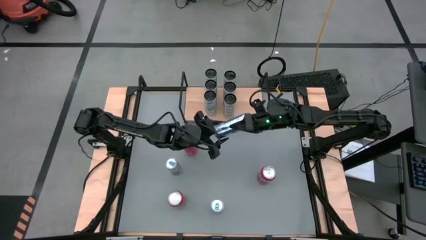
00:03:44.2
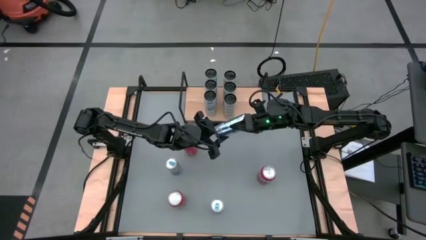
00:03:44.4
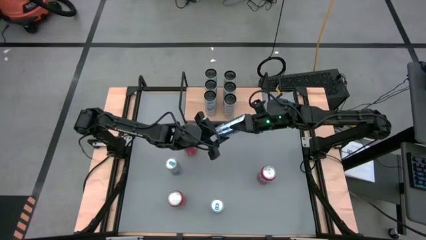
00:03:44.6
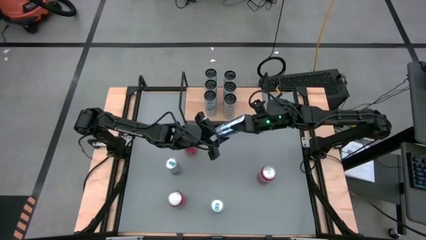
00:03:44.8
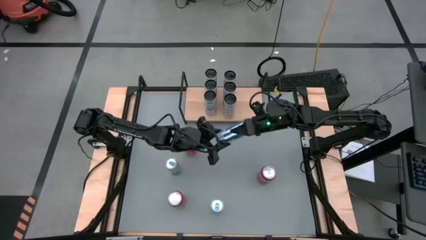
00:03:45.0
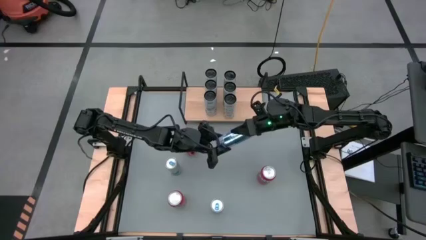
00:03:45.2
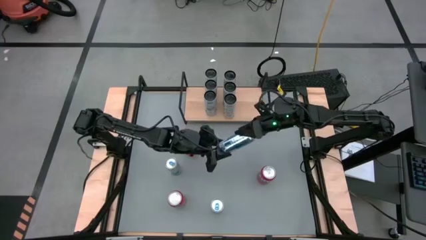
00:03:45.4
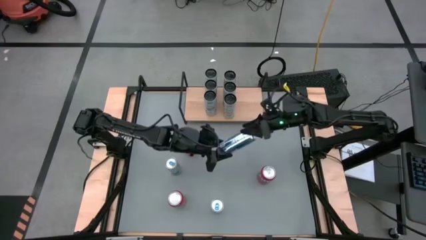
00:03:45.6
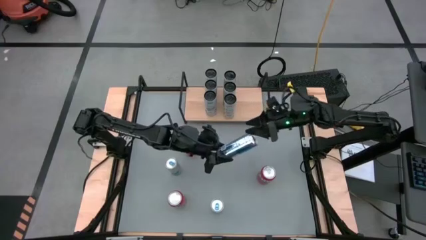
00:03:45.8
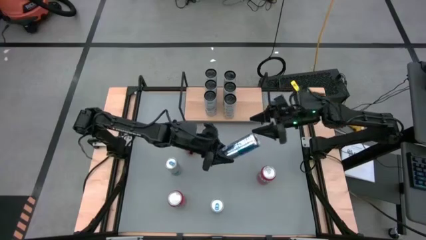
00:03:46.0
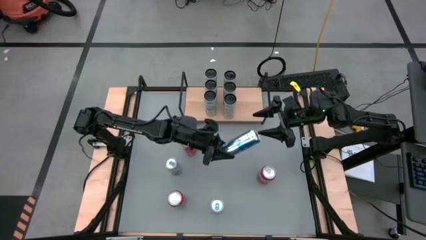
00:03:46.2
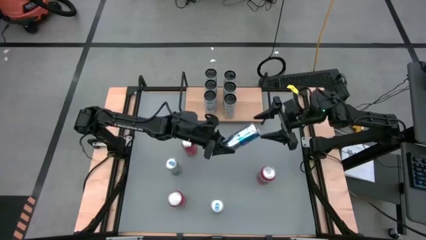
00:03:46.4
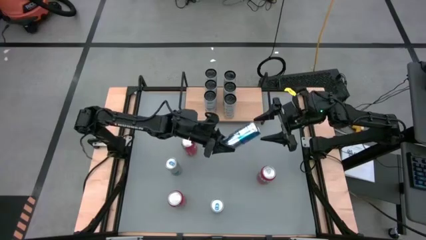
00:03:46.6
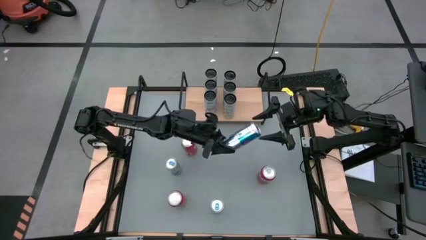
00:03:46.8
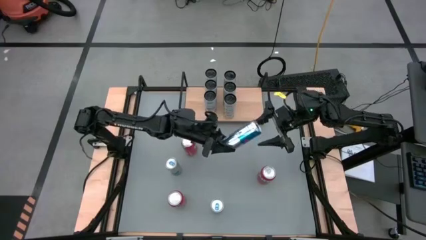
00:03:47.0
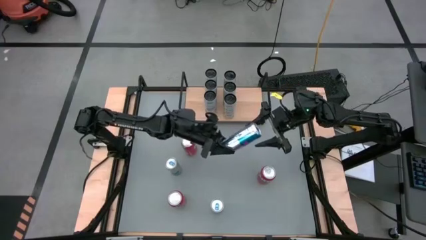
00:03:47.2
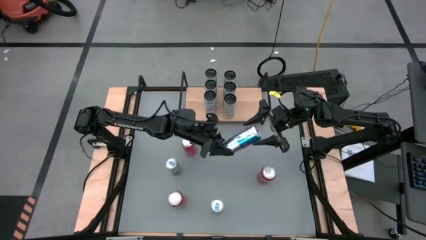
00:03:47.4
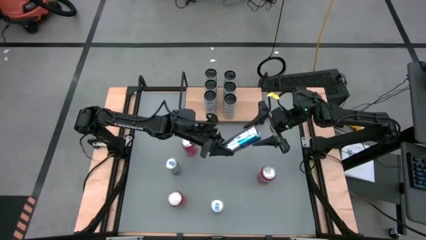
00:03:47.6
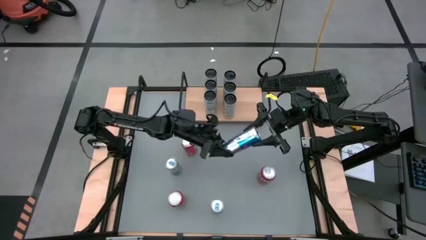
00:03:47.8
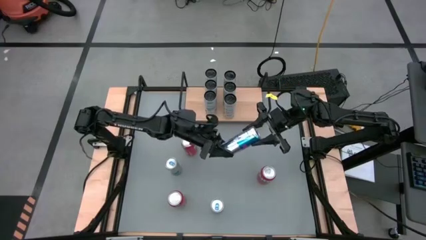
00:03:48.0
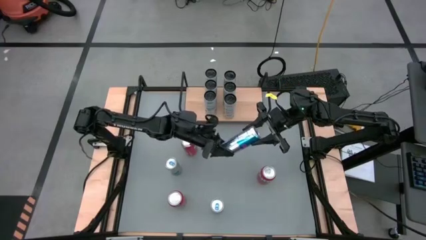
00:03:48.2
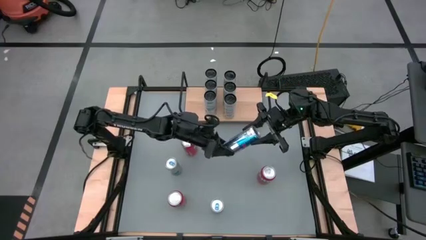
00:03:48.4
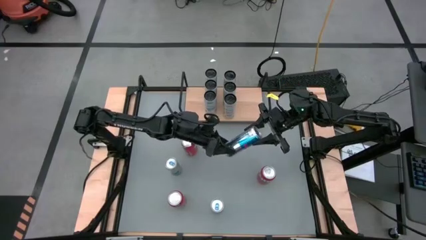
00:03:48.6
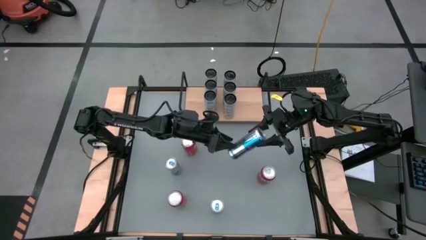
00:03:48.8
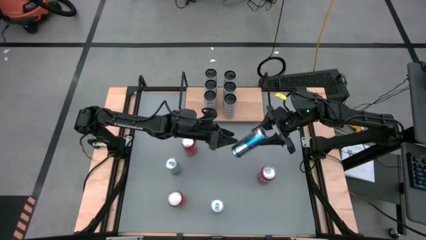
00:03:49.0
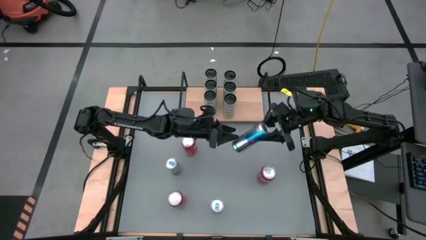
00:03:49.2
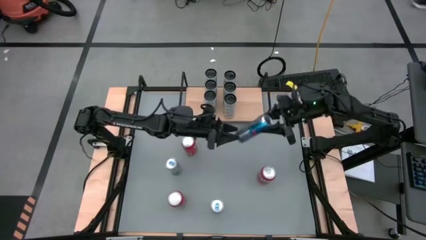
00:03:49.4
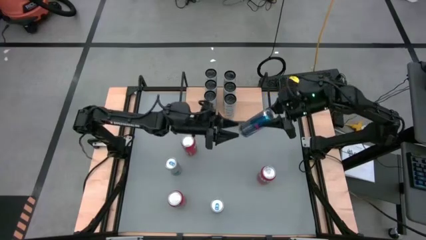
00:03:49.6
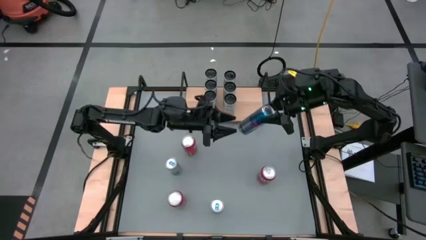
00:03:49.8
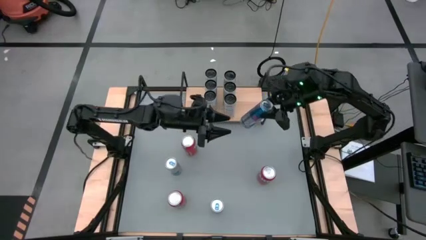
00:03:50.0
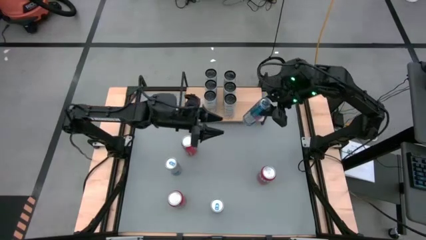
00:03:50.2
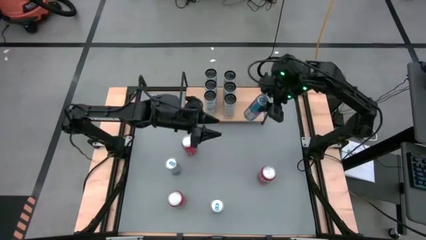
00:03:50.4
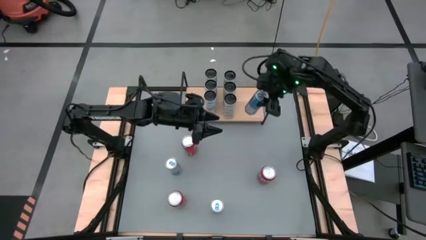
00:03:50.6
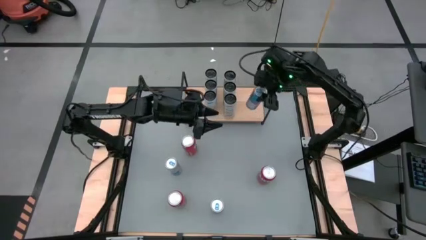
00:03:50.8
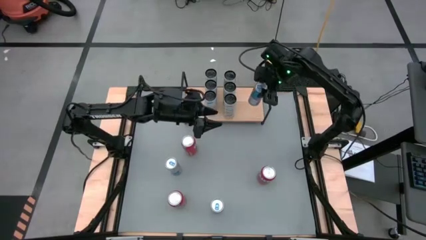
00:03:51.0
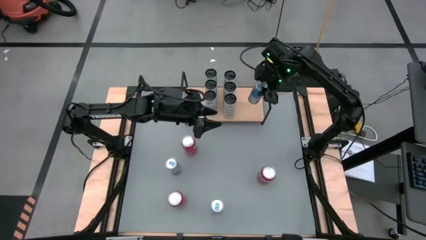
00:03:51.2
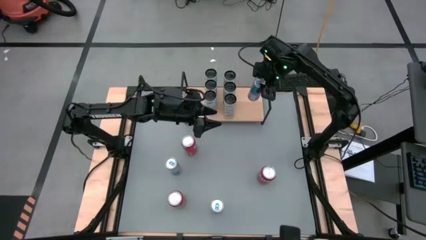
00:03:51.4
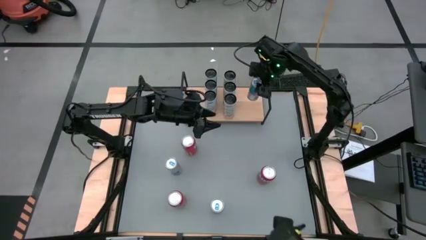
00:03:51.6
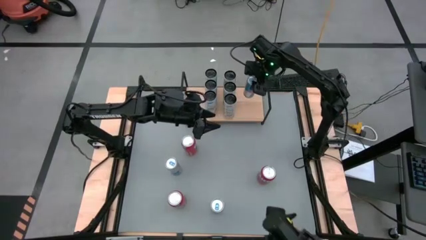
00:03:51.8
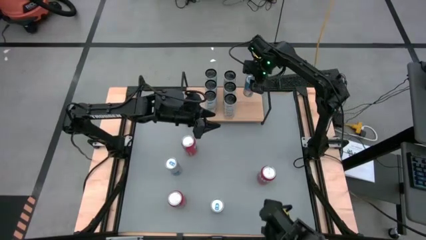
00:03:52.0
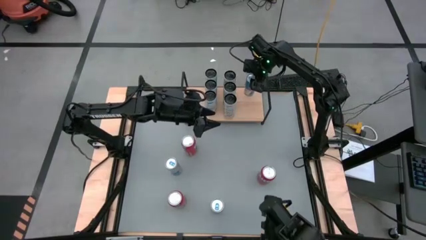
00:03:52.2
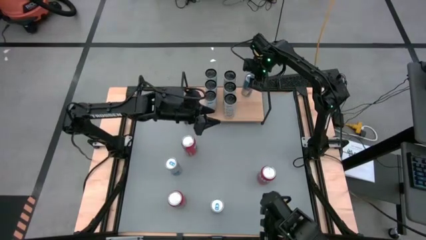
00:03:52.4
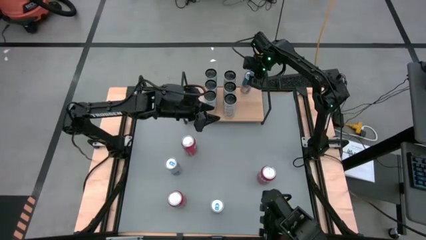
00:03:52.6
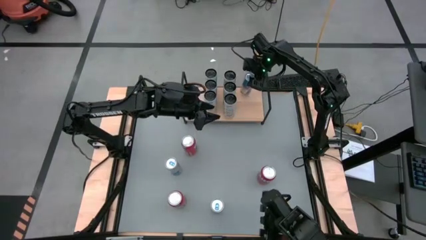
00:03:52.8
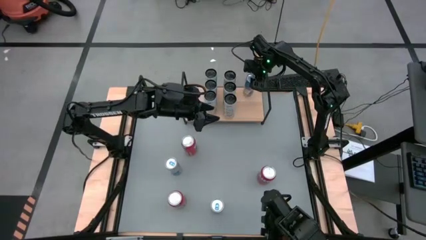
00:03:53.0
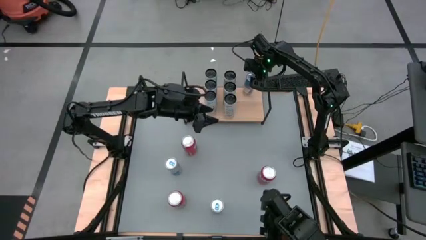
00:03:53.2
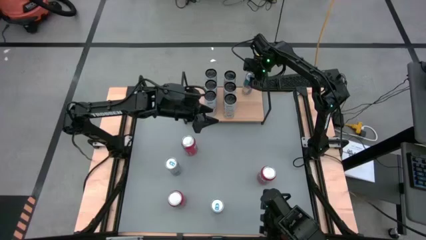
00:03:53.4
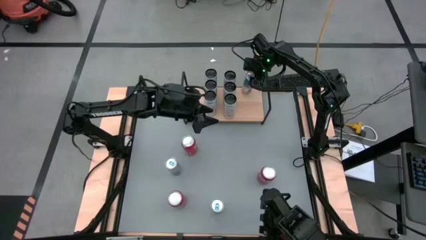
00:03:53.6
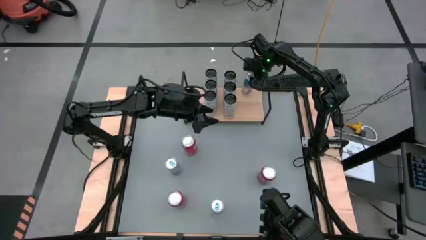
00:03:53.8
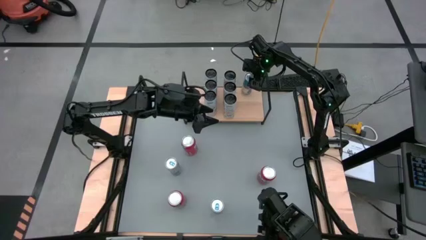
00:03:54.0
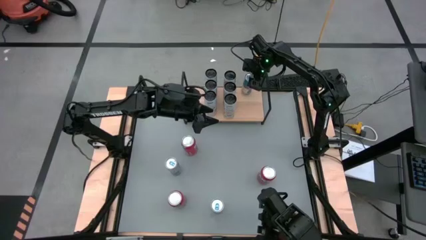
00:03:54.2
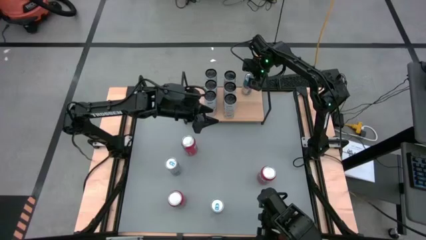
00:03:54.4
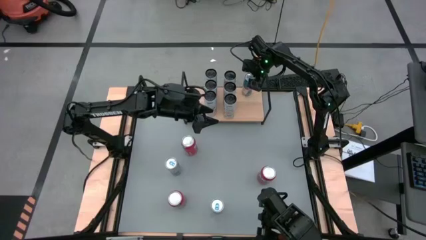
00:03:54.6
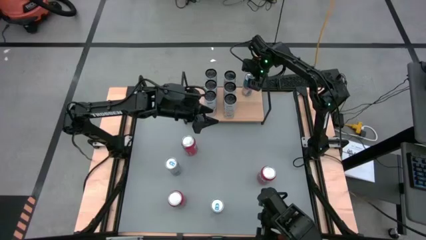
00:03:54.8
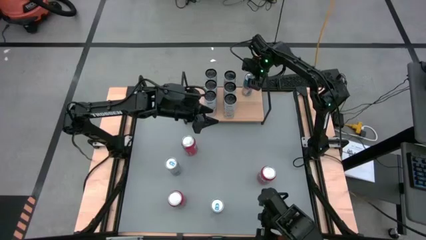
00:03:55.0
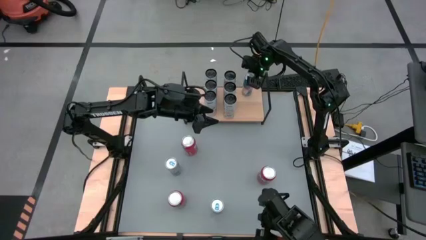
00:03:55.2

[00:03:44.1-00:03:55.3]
Task: Place canned beverage on shelf
Put the top right blue soda can on the shelf
